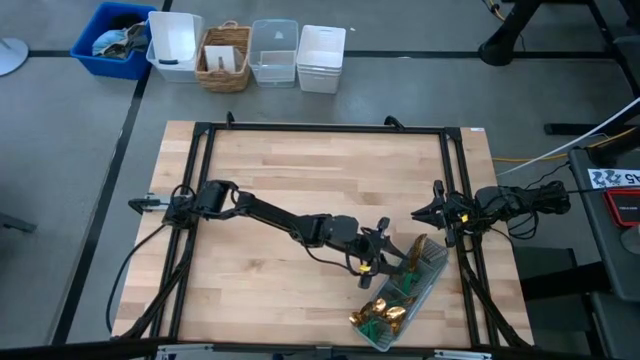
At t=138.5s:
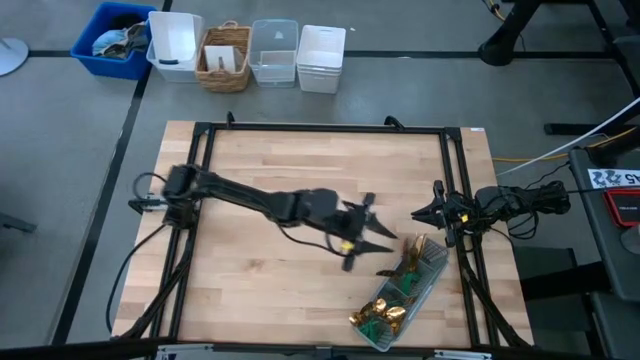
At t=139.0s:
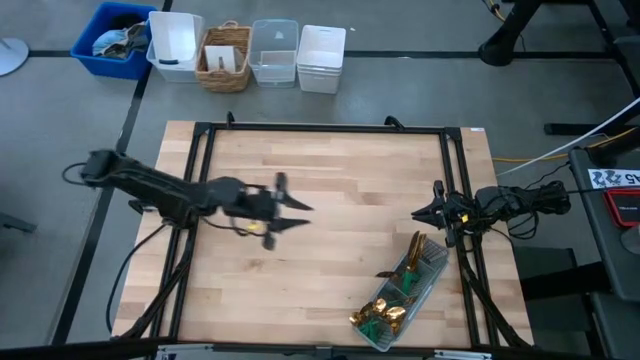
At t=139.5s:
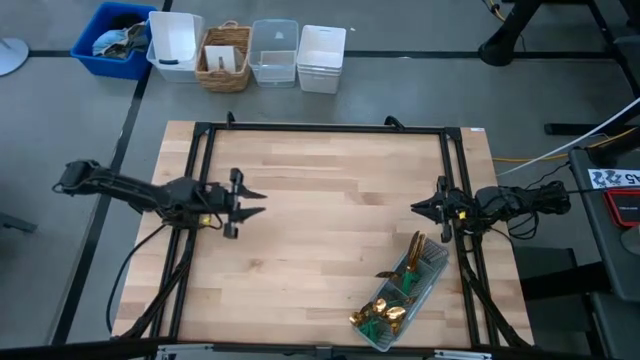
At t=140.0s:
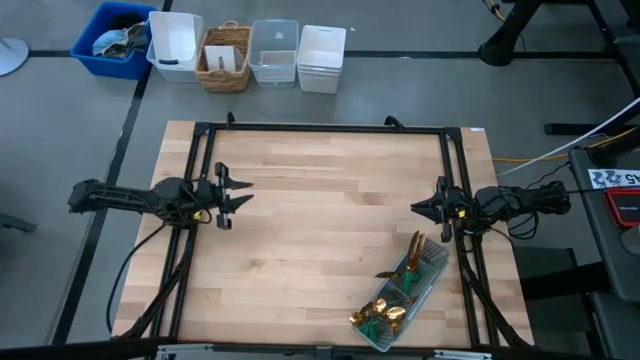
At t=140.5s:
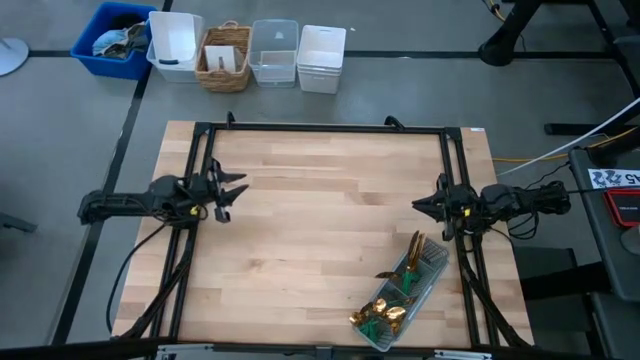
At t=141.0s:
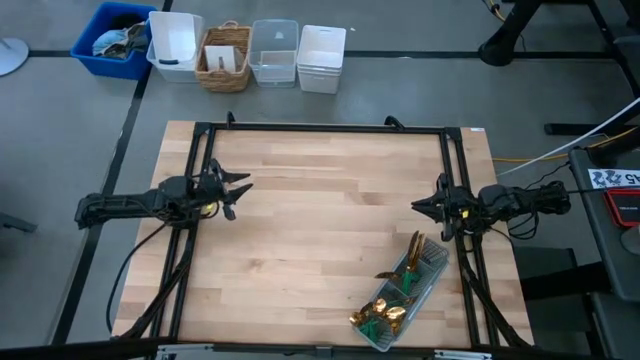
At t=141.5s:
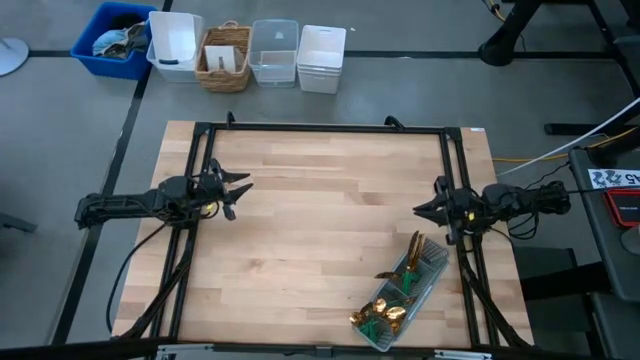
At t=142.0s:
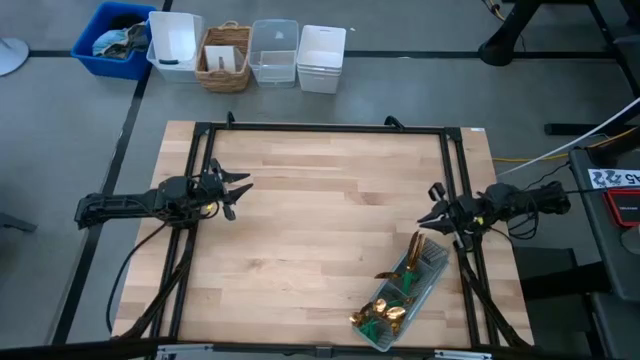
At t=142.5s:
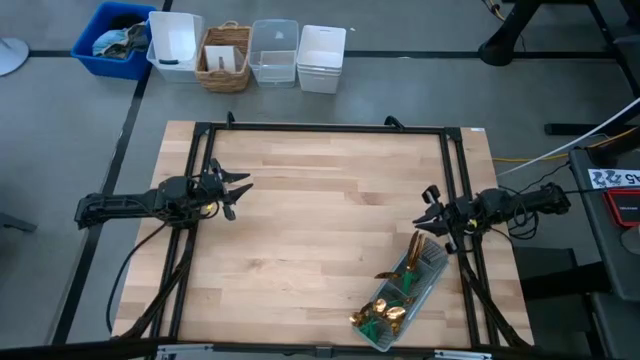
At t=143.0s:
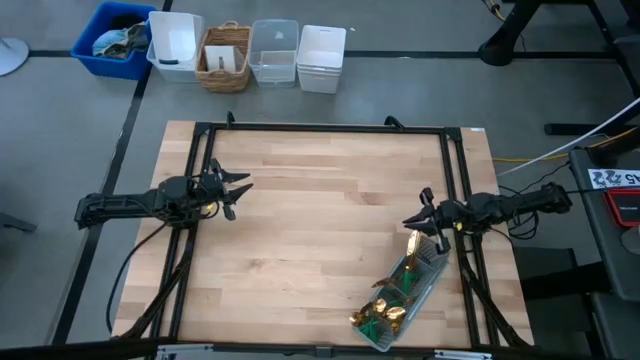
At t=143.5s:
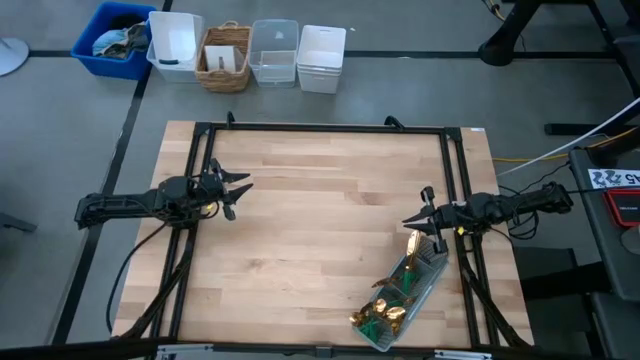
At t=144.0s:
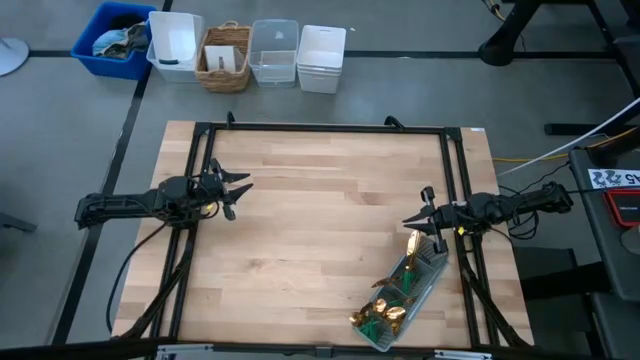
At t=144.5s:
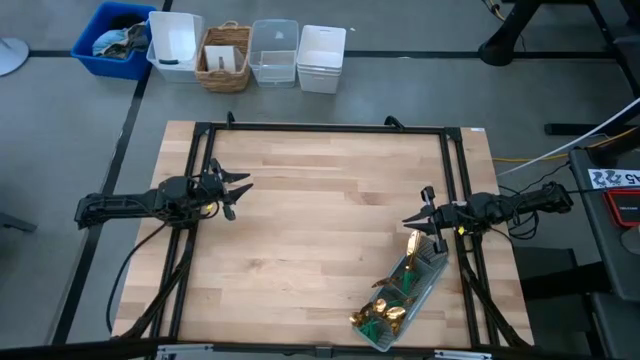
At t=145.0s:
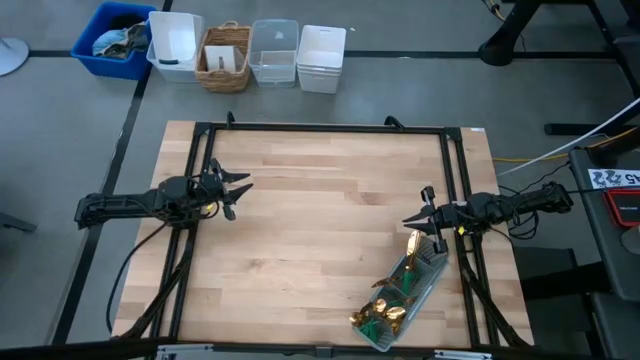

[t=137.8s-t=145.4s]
Task: Sort silverware
Return to Home Position

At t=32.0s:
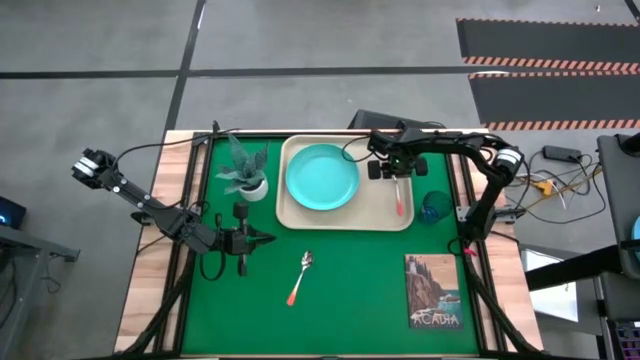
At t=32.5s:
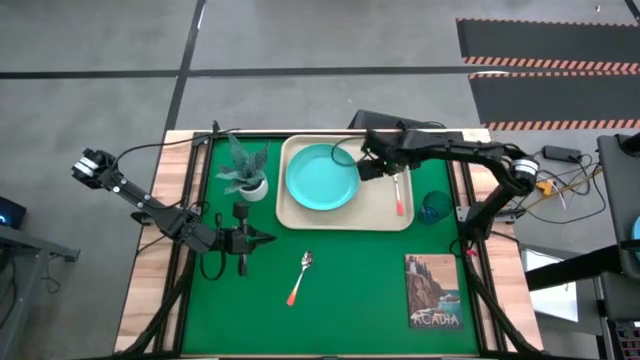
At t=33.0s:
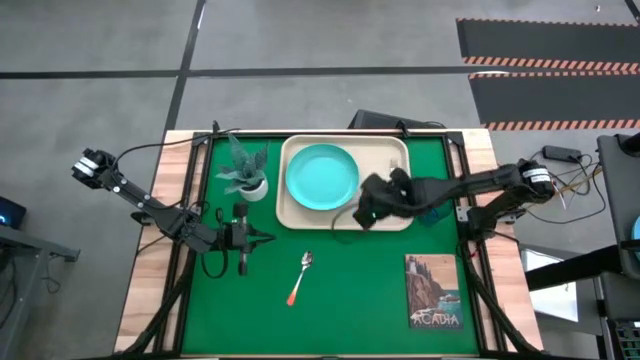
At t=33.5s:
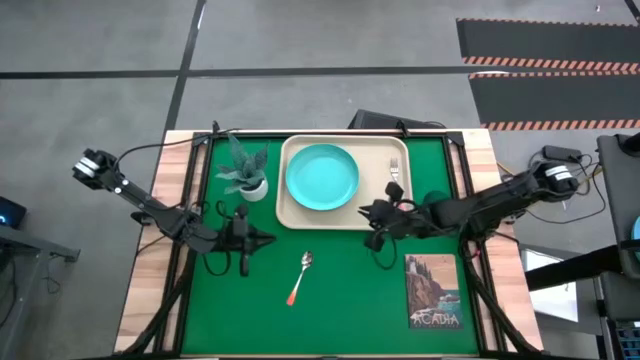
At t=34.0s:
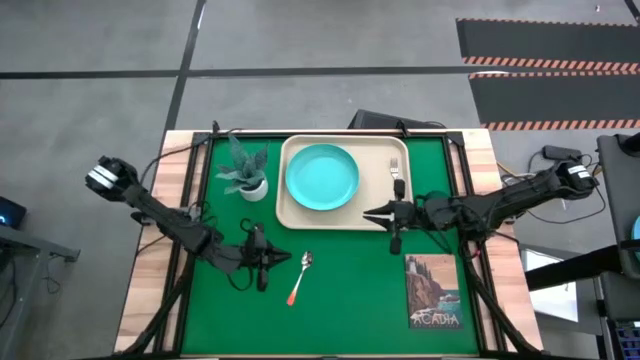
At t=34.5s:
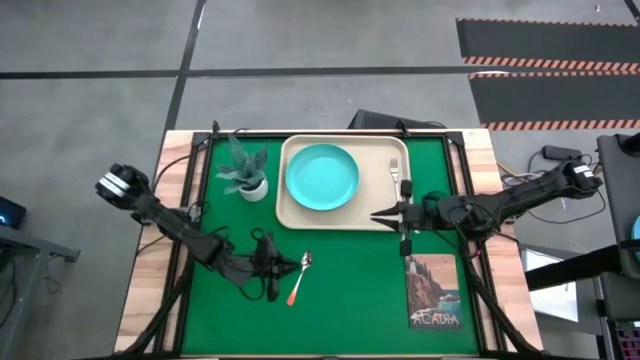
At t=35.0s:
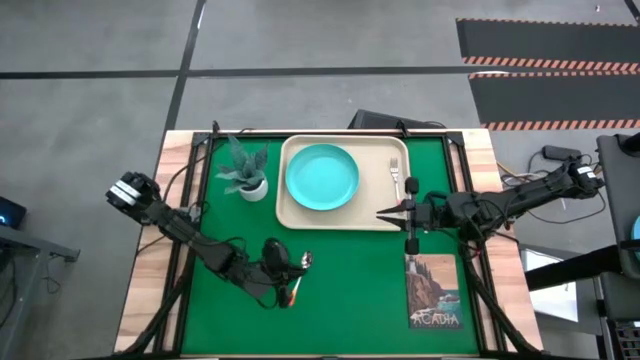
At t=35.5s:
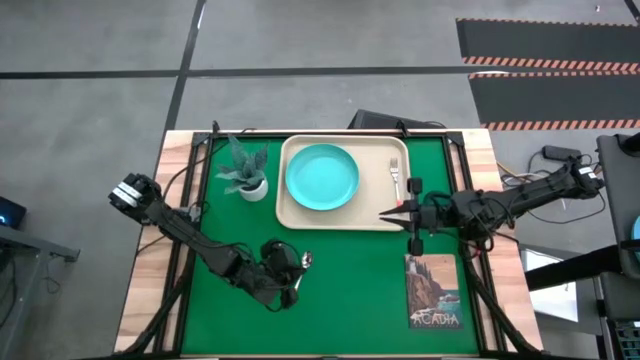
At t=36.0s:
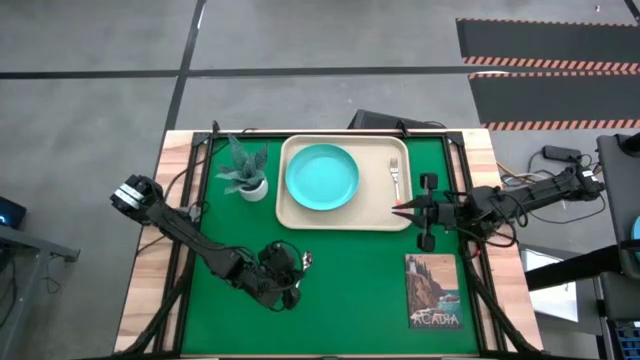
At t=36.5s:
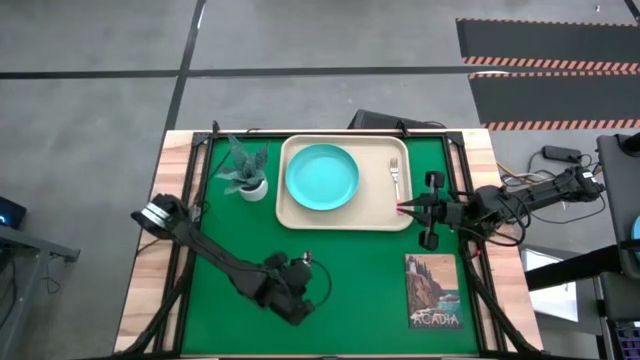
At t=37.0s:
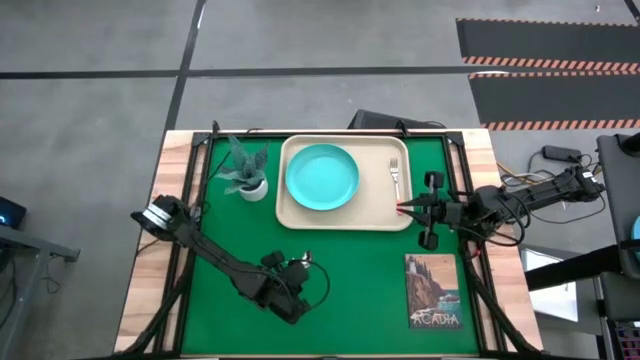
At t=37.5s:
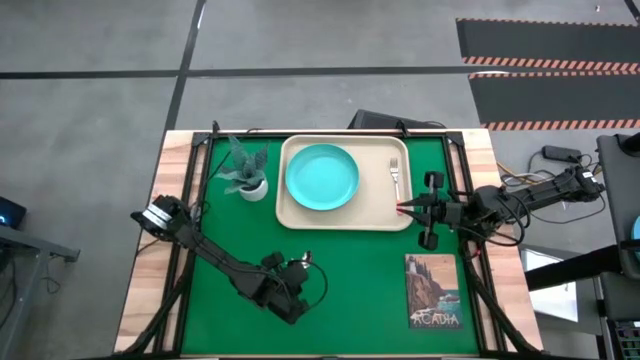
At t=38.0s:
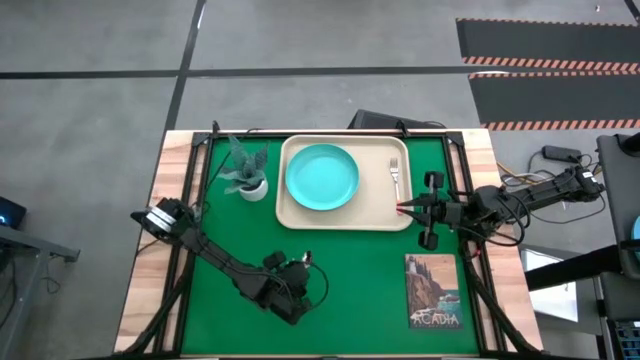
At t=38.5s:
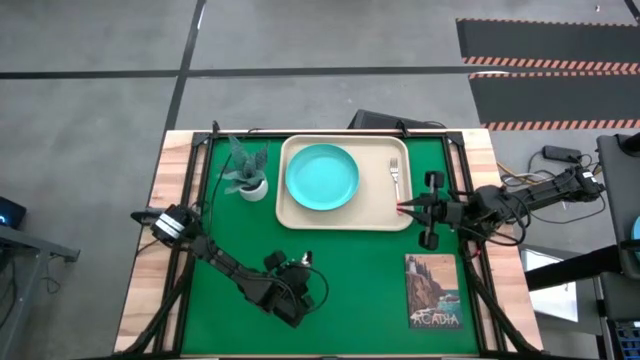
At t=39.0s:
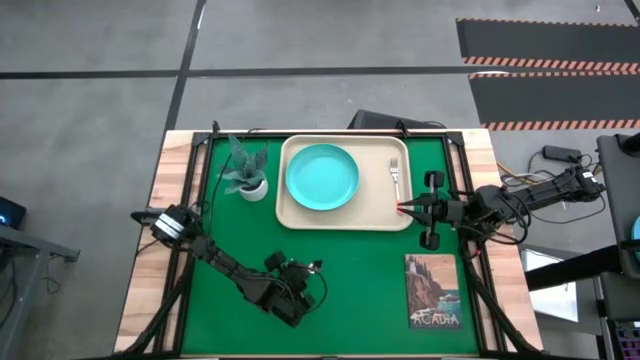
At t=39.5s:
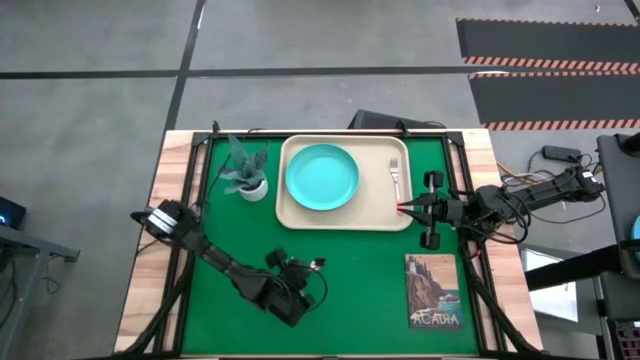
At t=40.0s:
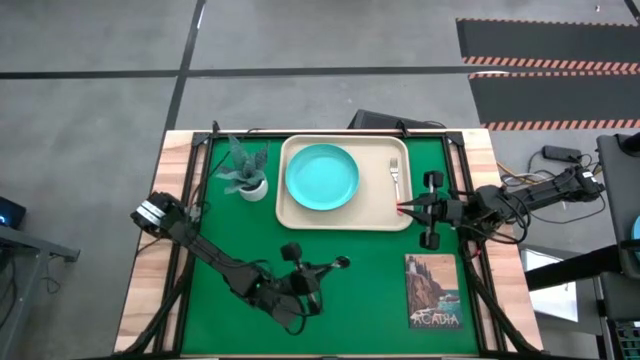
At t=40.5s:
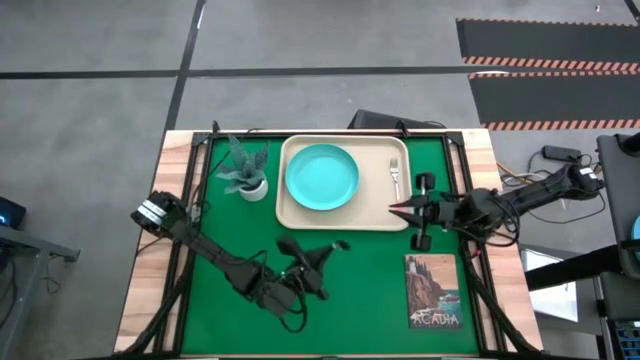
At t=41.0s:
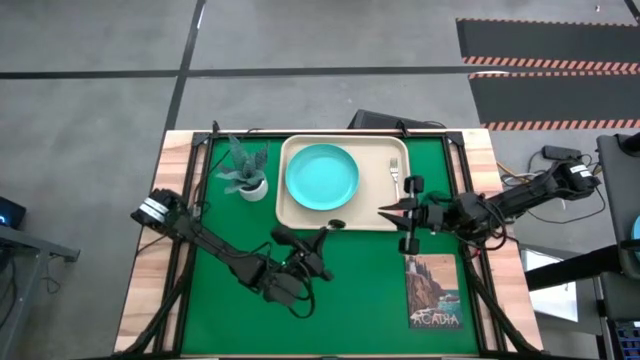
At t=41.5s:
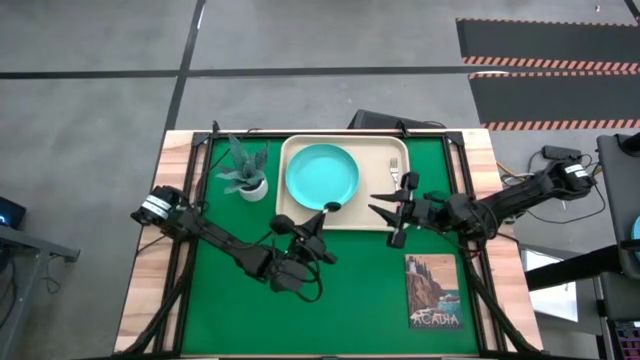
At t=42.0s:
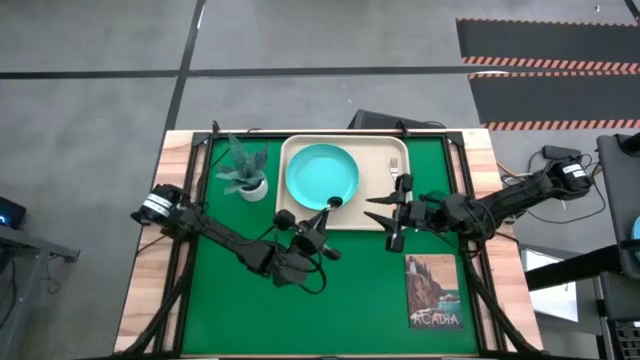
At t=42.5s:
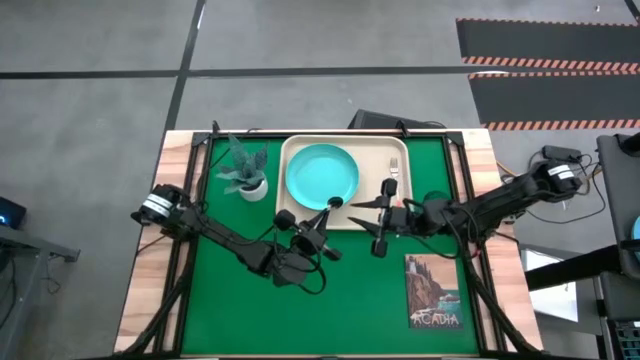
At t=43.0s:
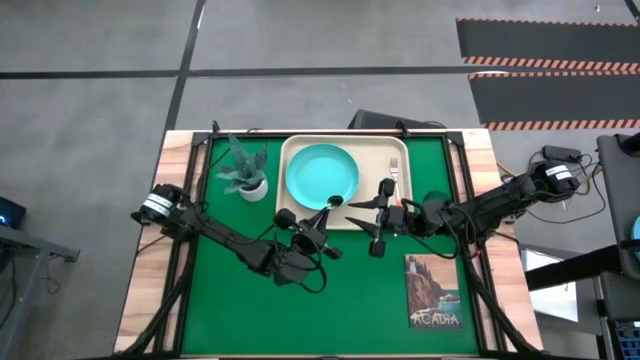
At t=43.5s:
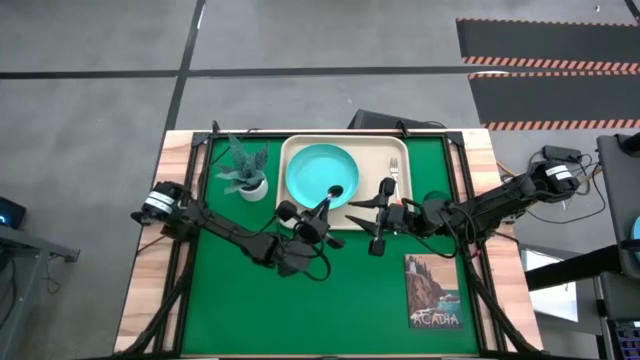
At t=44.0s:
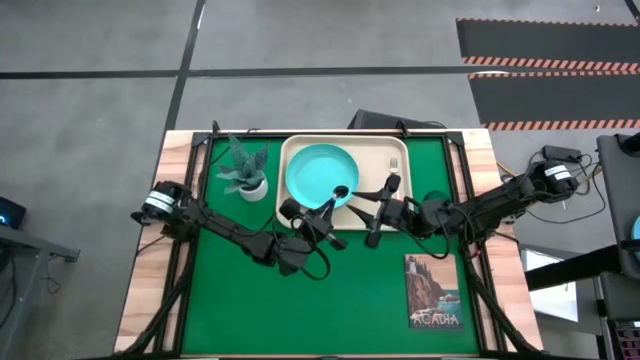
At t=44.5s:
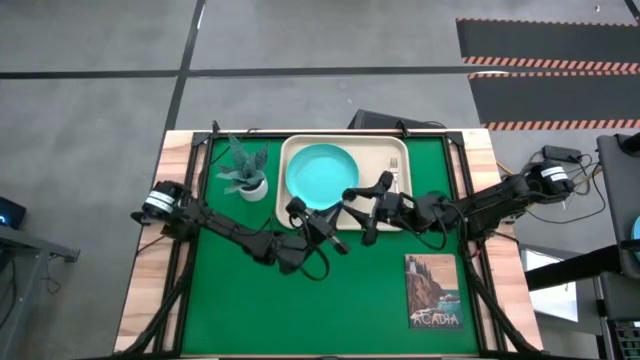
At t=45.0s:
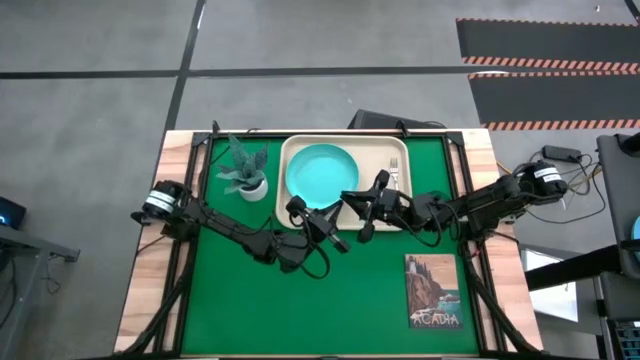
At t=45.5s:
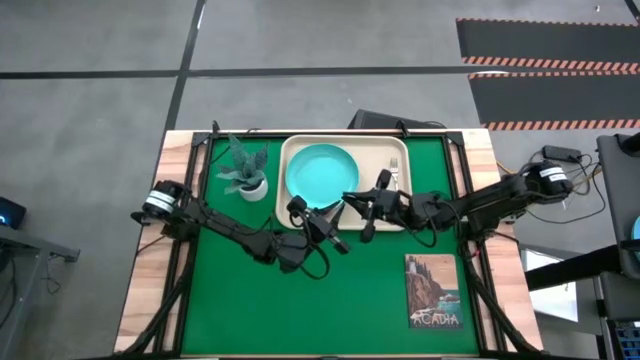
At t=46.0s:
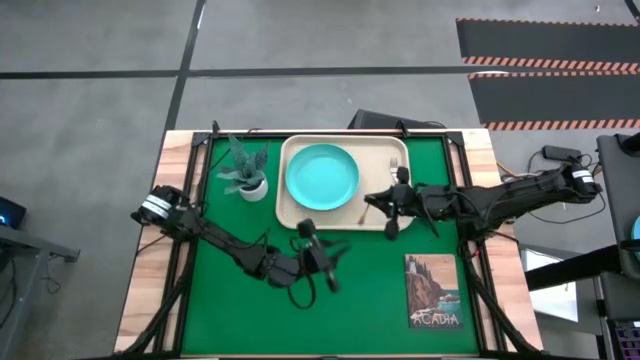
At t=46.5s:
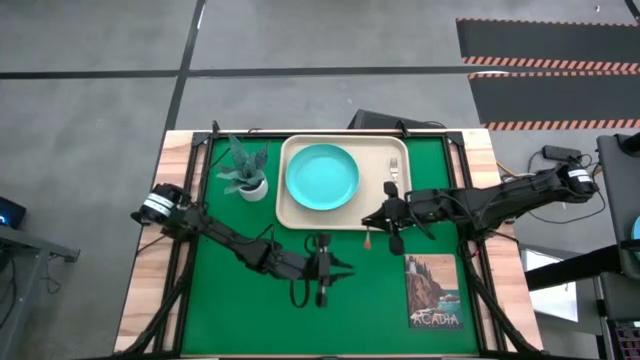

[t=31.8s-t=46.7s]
Task: Pick and place plate/cup/fork/spoon on tray
Put the orange spoon on the light white tray to the left of the orange fork
